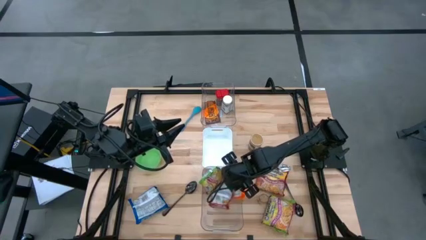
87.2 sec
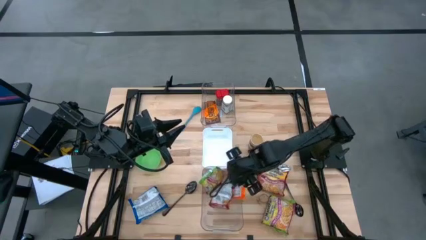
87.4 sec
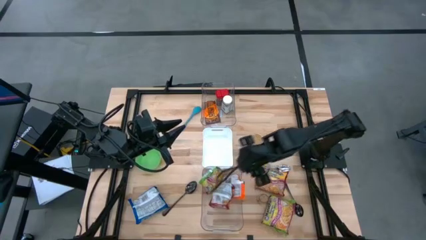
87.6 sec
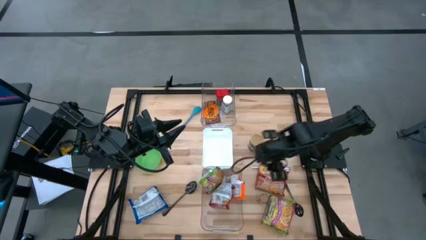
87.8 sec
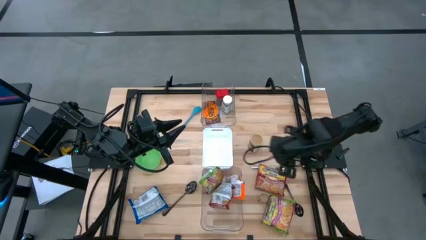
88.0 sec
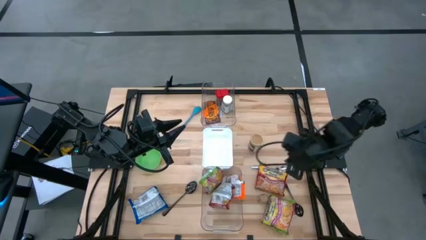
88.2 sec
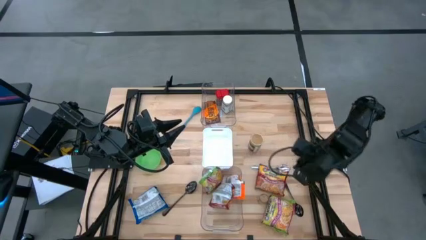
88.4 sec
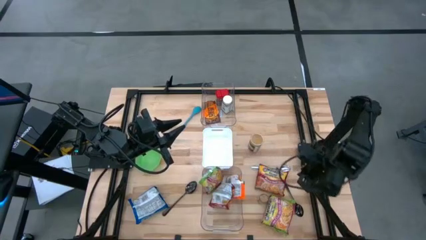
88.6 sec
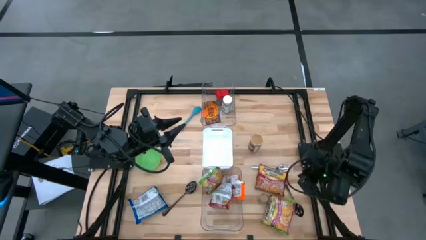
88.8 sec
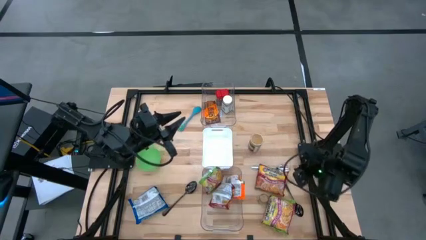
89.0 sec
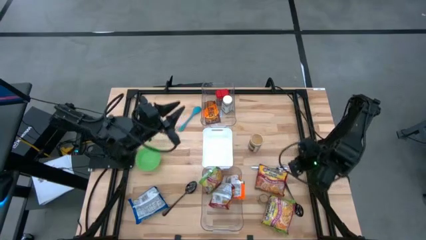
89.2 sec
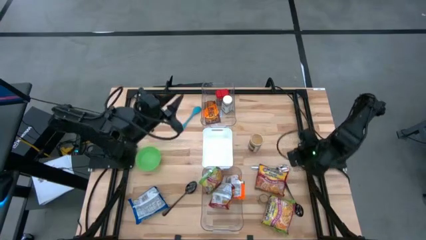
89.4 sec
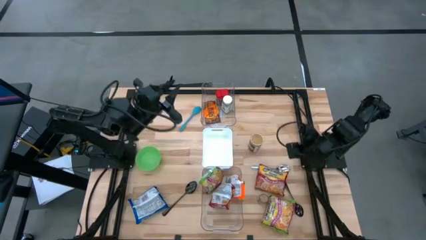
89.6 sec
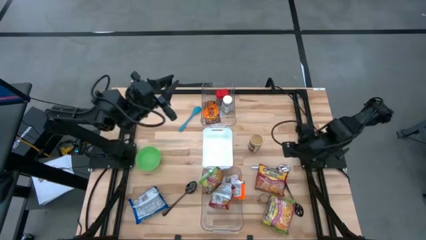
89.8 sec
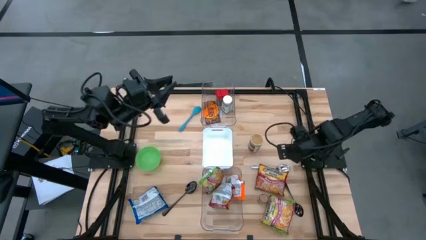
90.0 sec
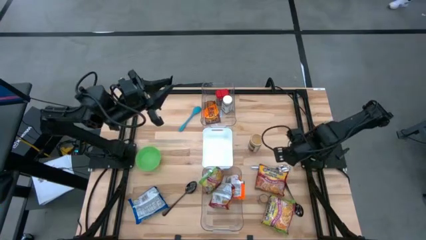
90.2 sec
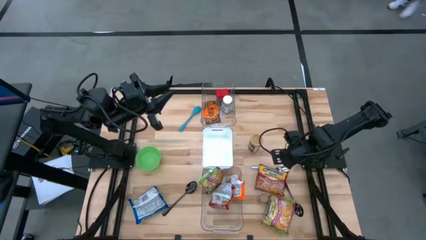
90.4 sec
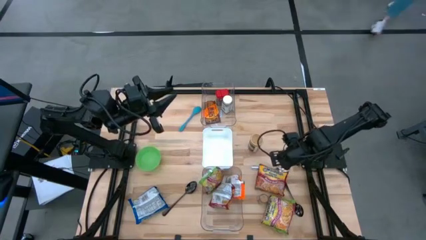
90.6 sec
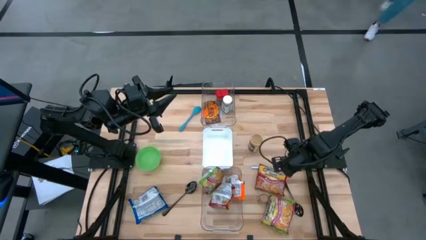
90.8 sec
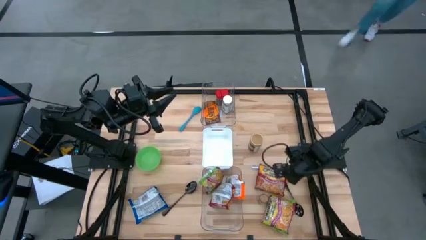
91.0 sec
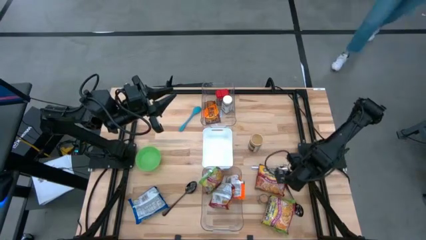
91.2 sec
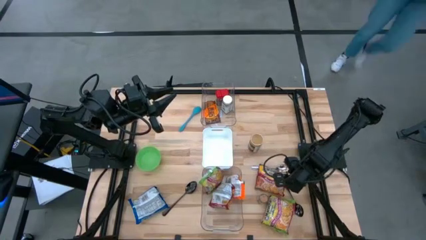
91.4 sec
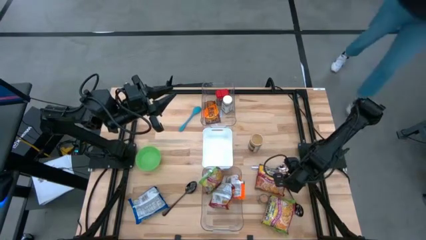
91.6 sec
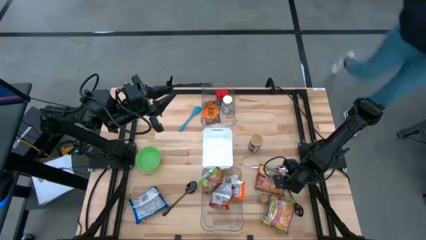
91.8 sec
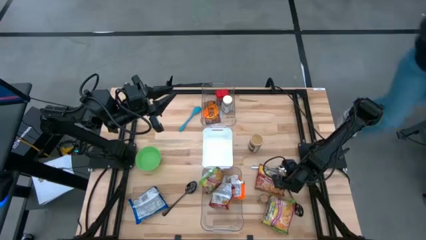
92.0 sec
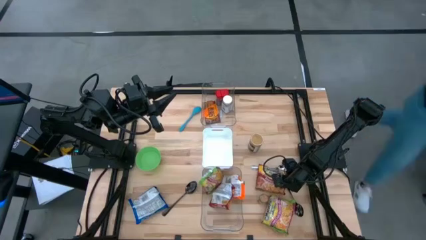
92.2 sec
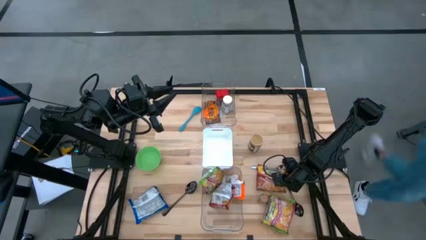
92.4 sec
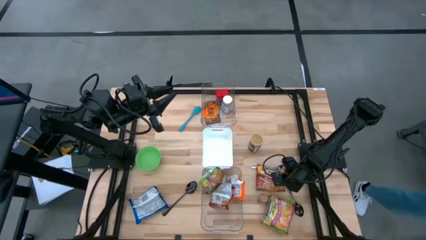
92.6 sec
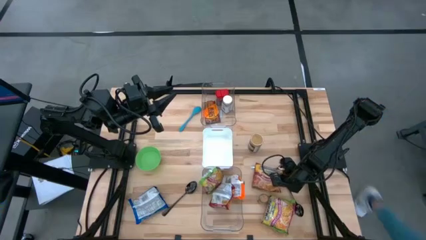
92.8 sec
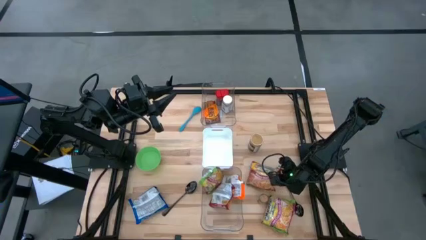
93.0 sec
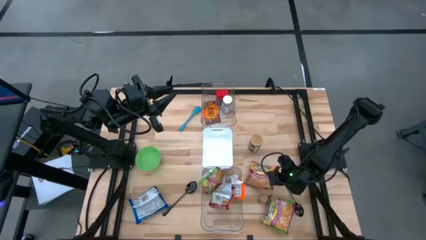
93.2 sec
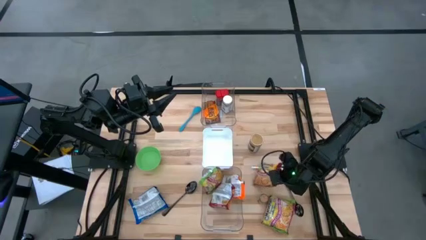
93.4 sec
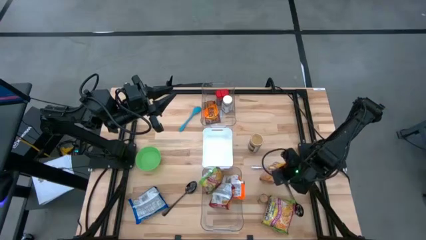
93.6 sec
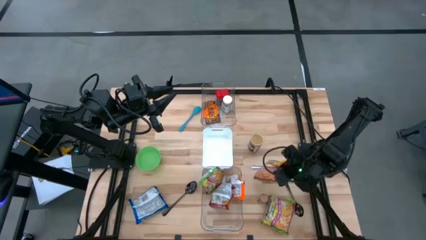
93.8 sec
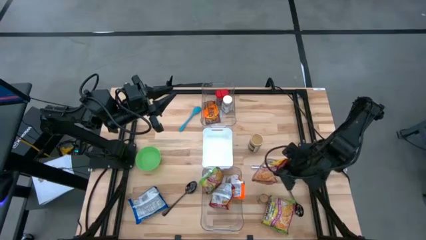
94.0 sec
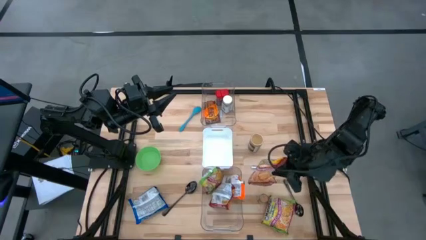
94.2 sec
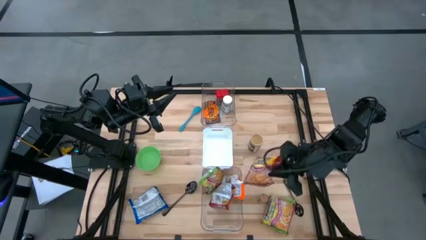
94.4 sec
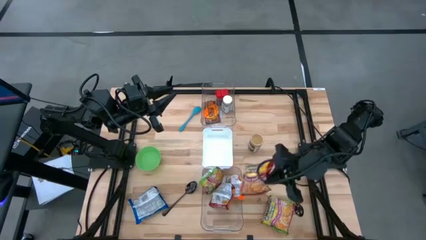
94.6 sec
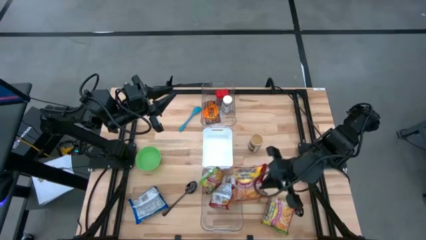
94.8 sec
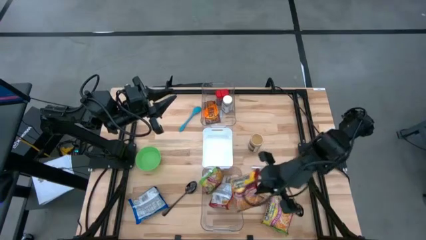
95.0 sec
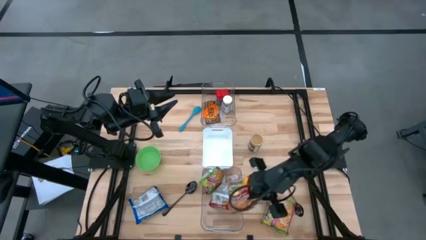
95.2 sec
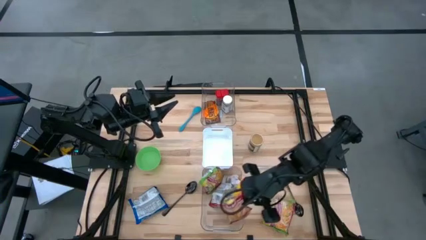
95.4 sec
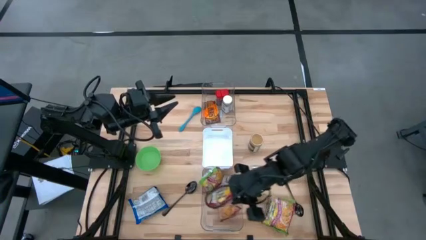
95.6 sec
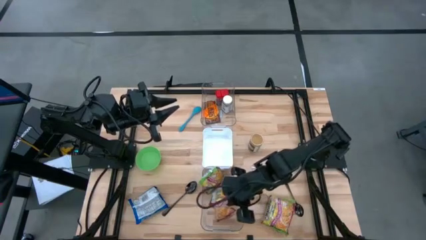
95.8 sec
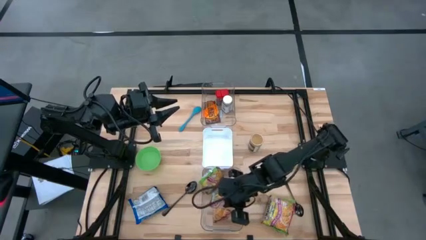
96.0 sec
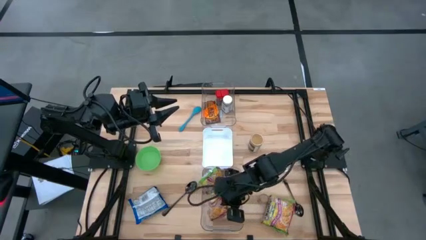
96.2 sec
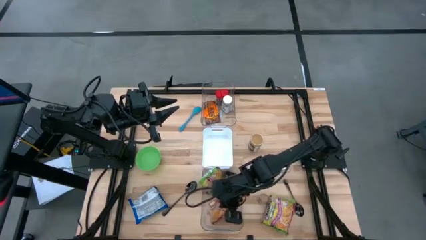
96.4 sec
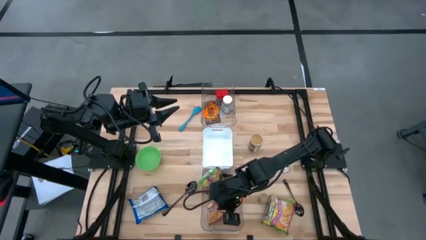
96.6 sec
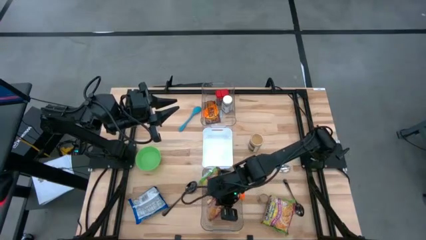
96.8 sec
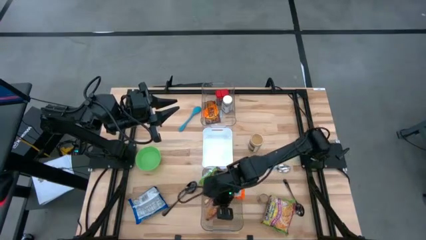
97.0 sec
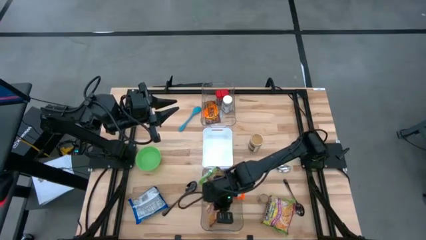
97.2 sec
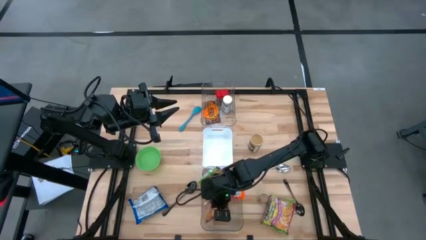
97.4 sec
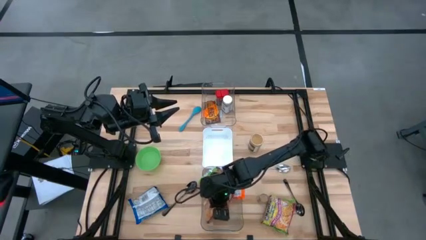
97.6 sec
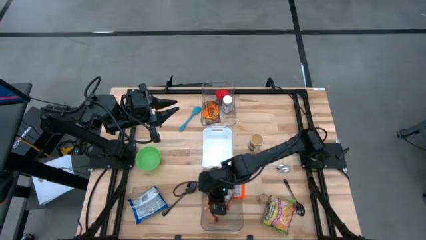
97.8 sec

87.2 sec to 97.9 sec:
Task: Pick & Place Food Item
Put the red noodle pack into the bottom transparent bin

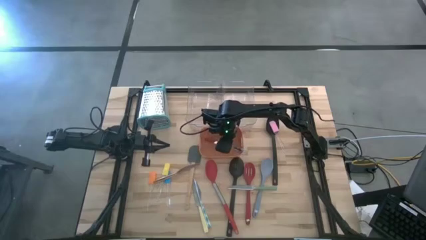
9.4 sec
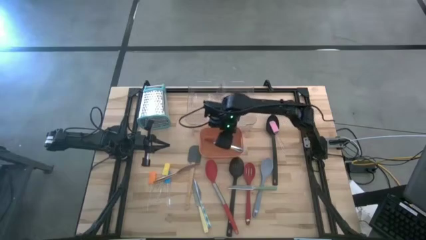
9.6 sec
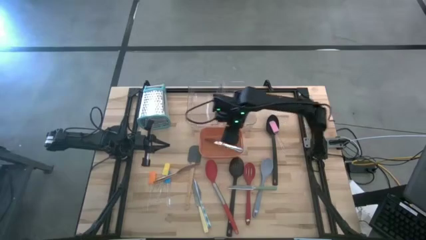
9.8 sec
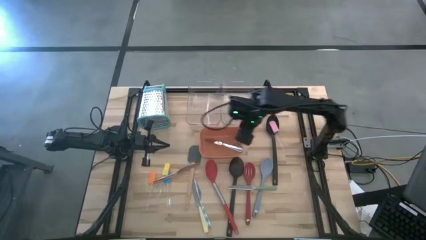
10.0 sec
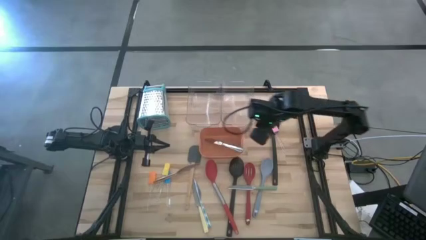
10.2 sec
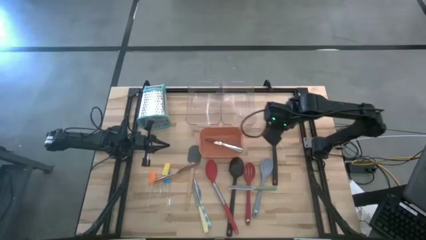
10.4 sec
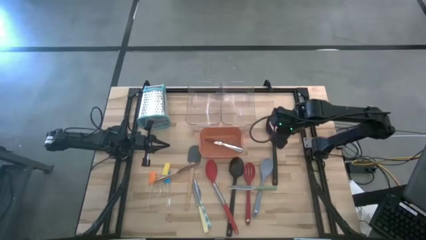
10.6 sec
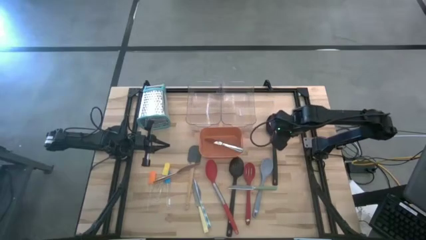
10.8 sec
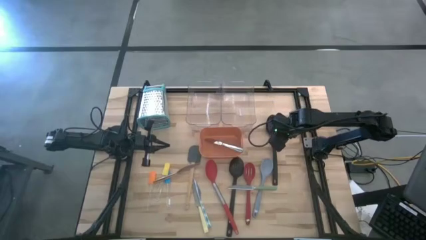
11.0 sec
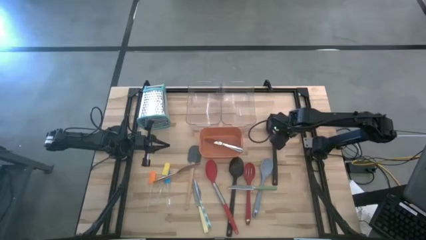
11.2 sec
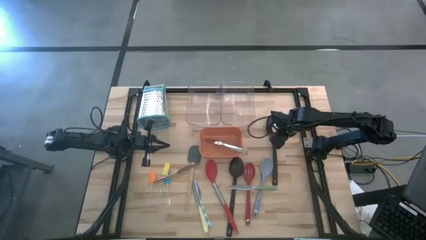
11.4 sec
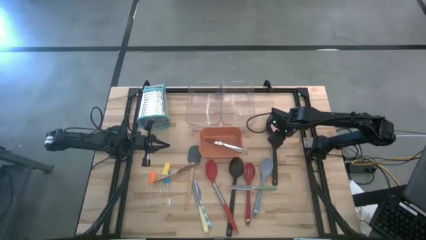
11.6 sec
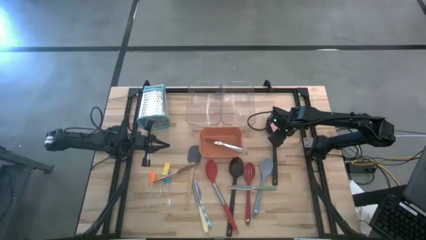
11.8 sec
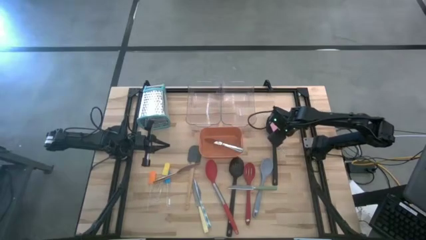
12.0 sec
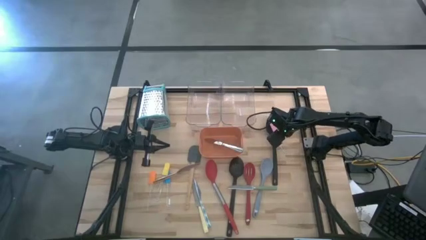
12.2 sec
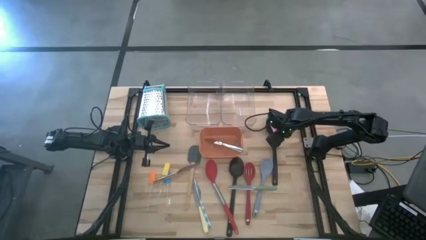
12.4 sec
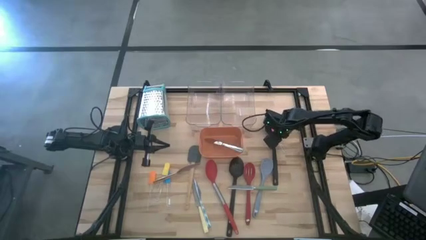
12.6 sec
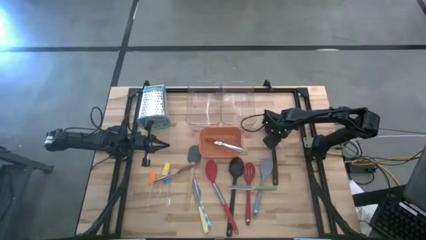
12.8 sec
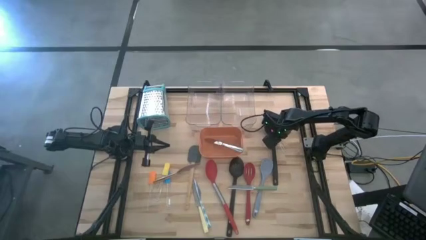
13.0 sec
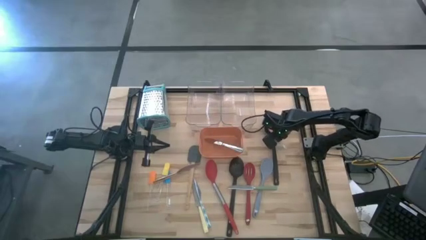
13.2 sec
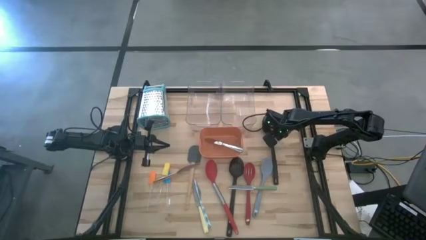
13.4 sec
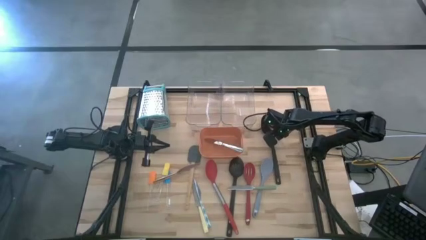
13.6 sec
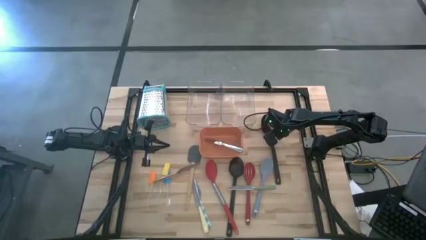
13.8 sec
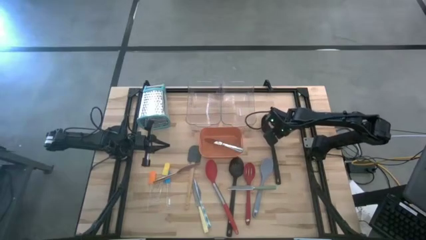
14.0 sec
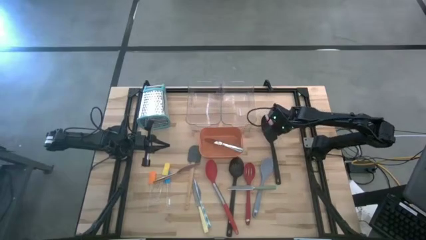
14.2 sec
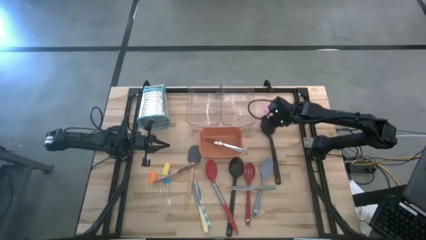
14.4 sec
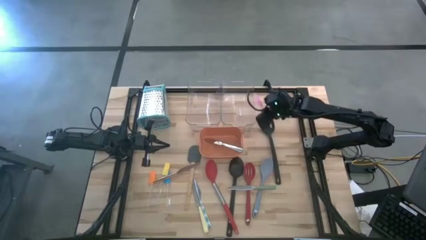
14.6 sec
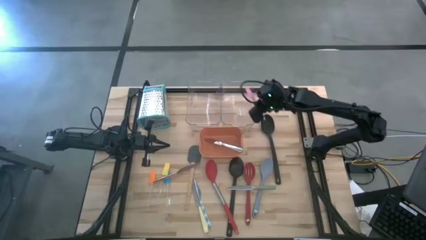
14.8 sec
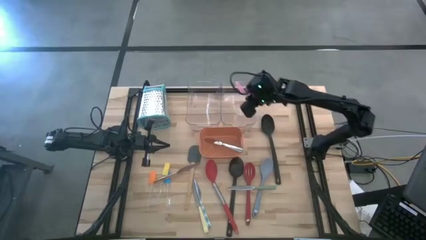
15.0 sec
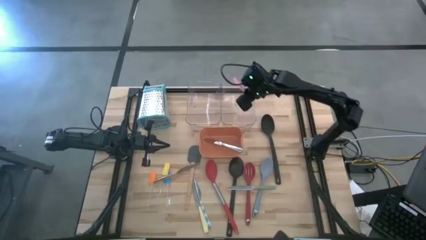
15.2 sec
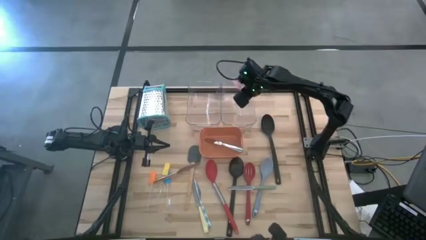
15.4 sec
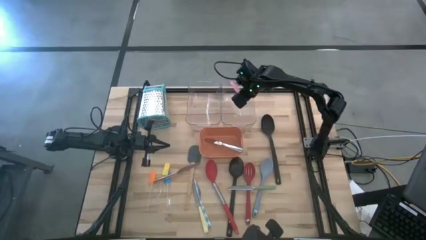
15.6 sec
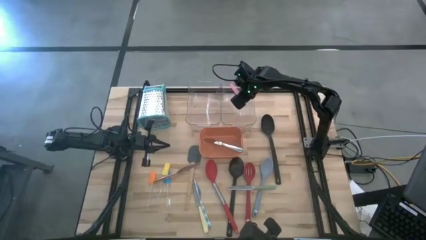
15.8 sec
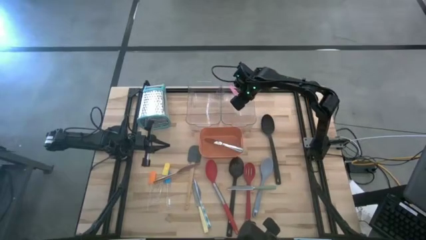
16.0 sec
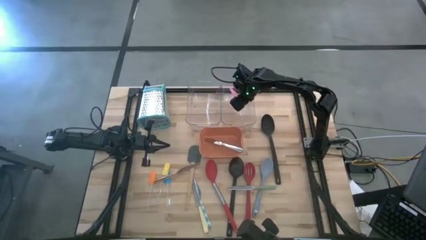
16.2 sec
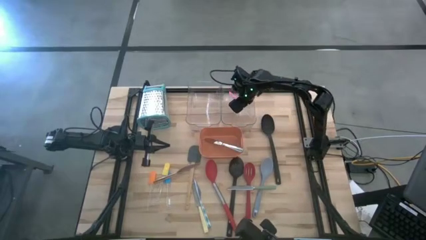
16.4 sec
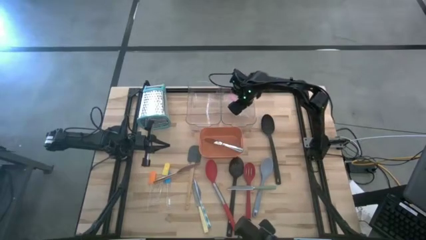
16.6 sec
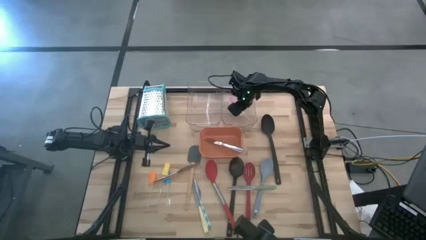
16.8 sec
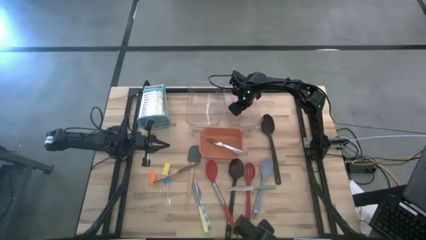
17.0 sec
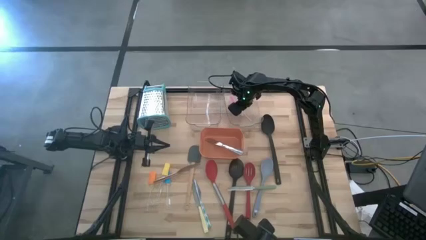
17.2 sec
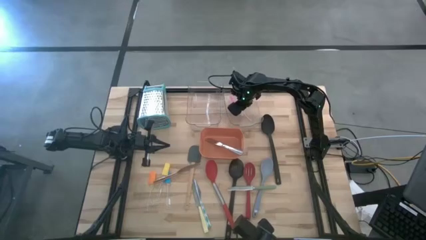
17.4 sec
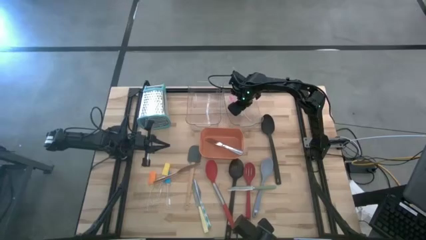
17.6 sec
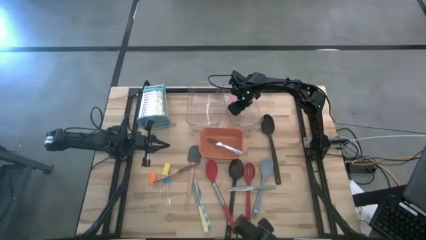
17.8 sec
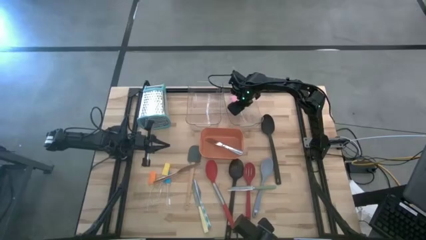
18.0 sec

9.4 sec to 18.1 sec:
Task: Pick & Place Kitchen Items
Put the pink spatula into the right transparent bin
